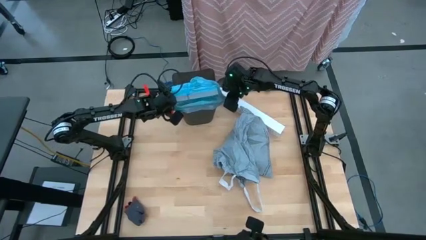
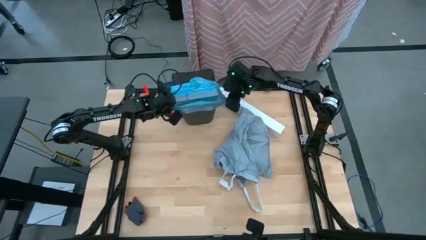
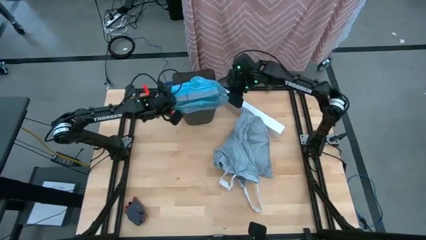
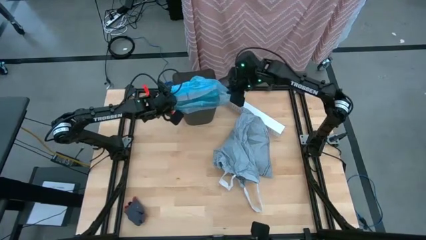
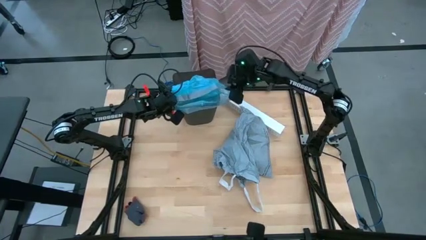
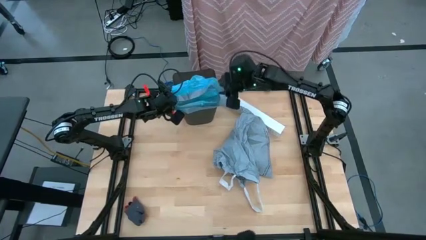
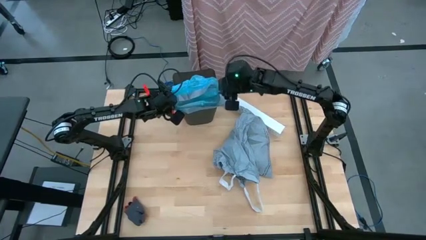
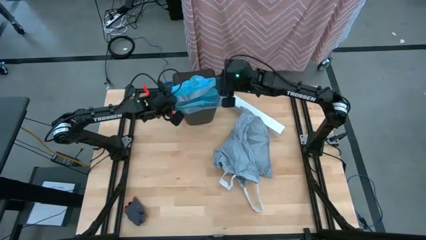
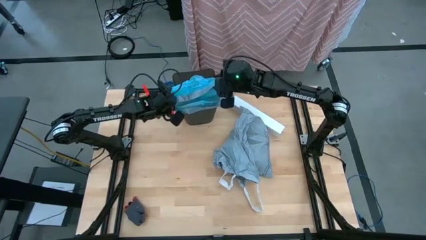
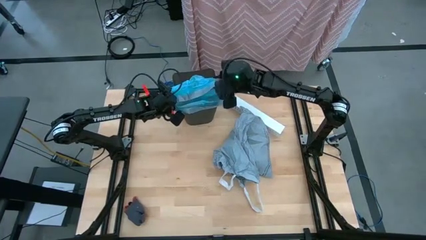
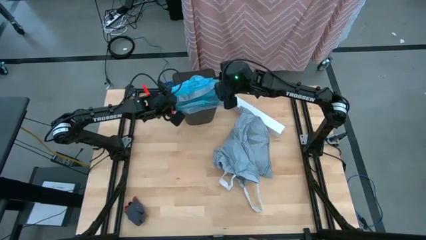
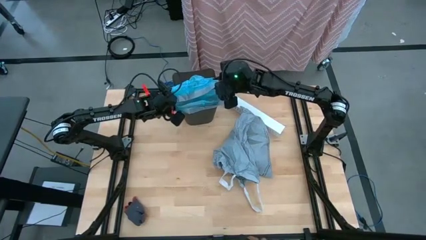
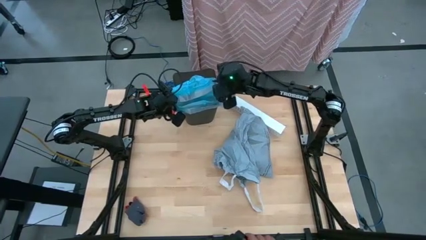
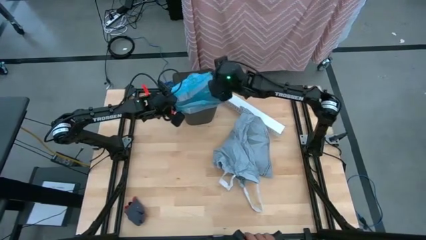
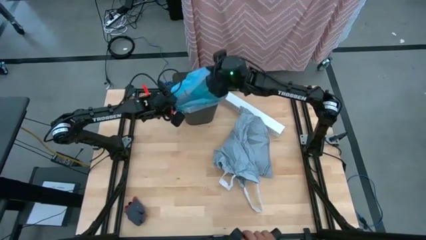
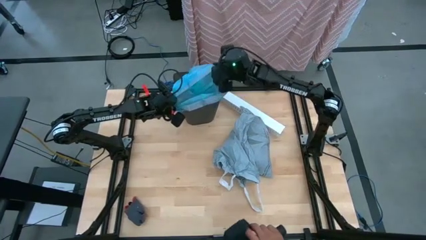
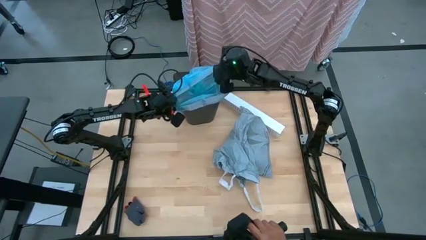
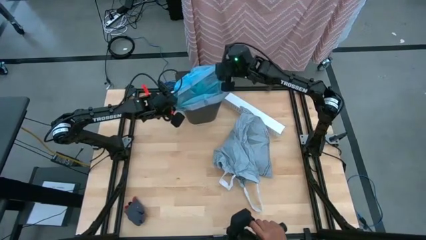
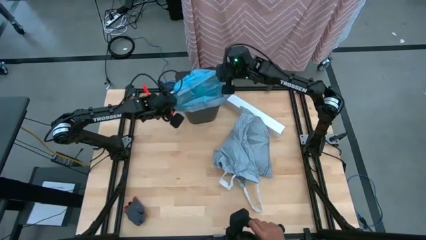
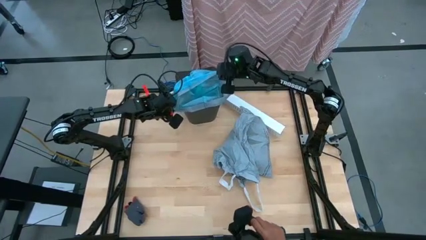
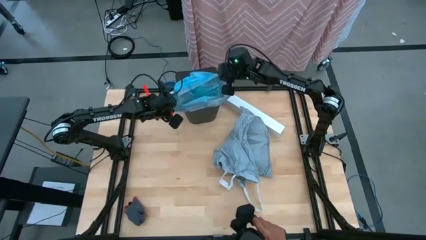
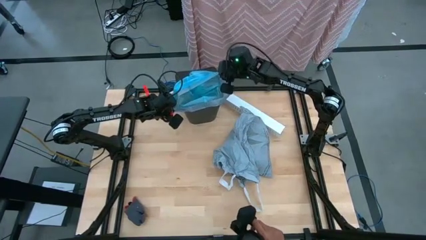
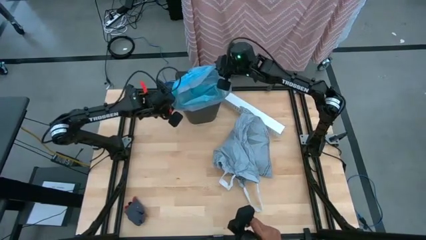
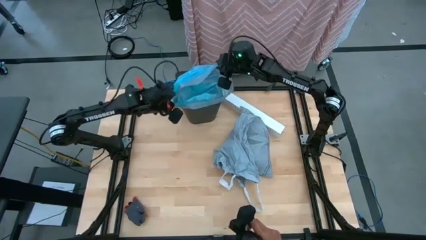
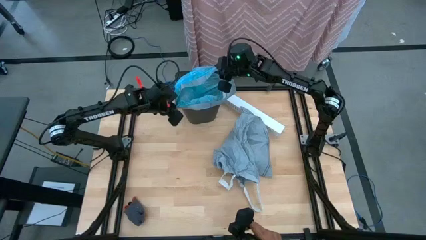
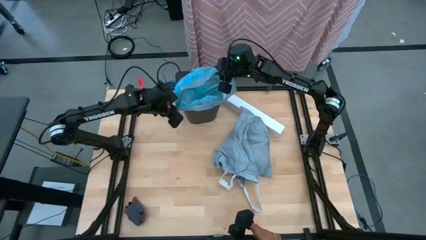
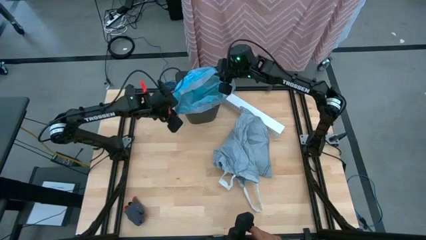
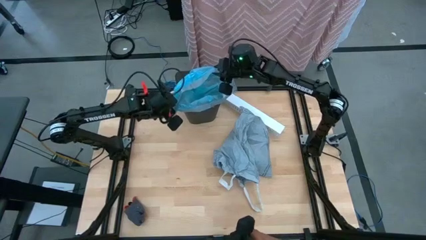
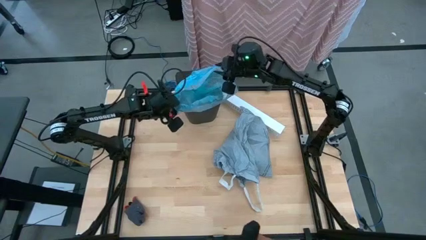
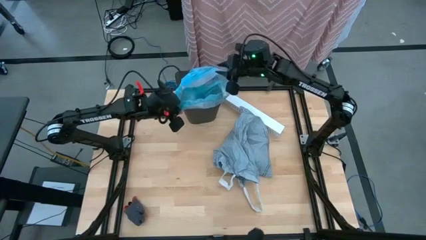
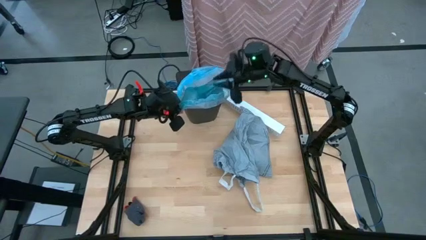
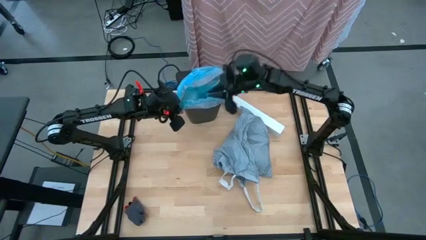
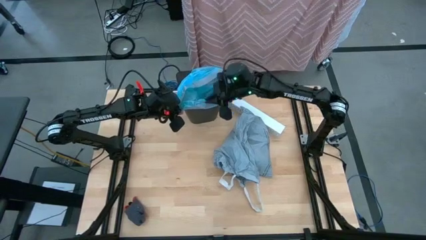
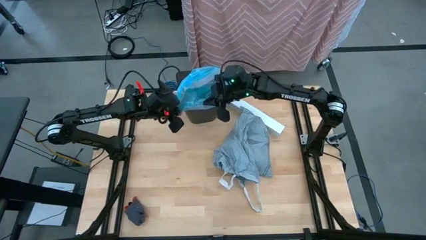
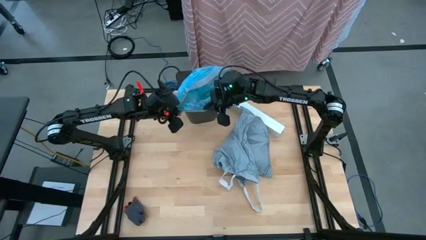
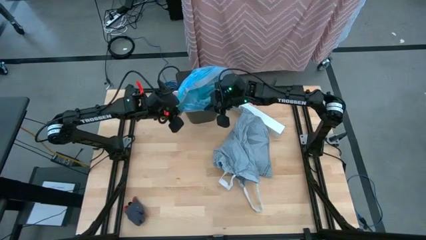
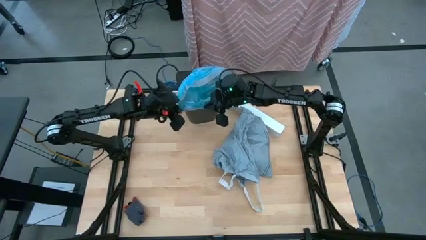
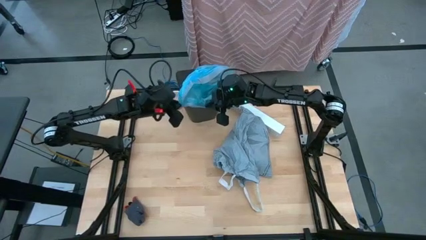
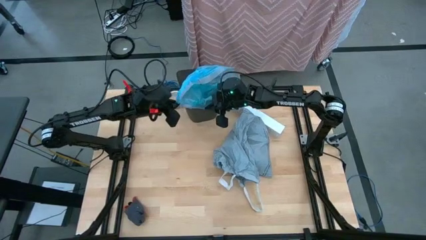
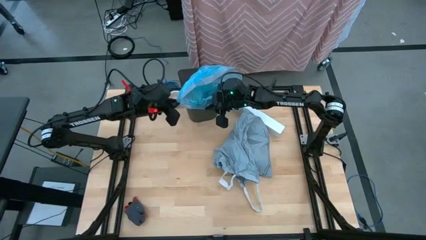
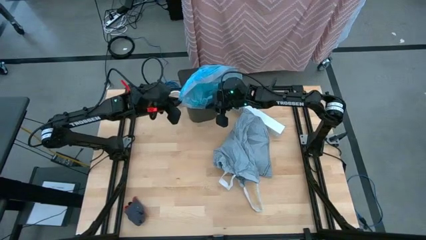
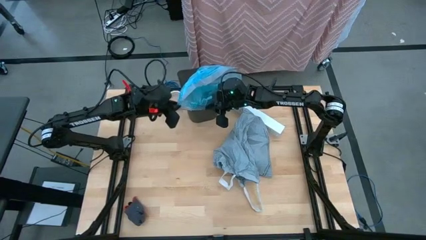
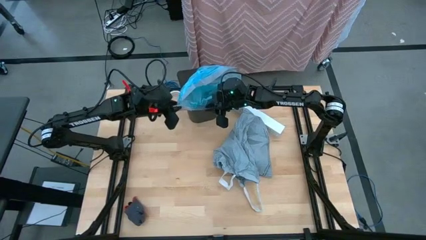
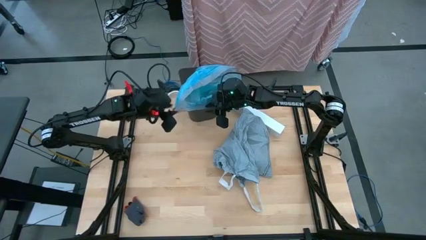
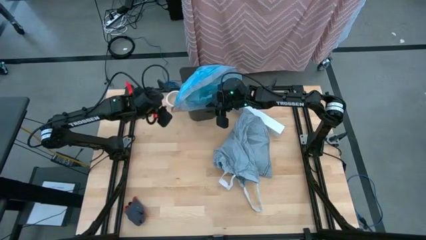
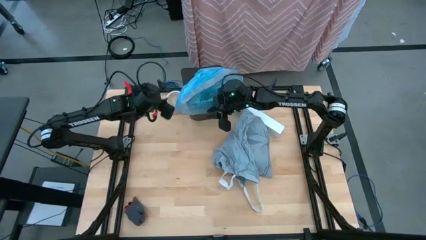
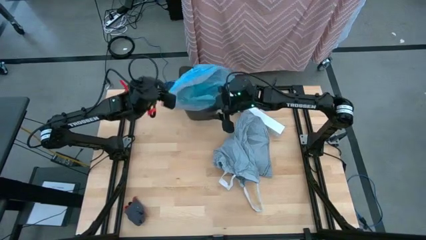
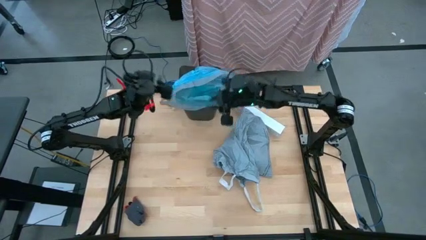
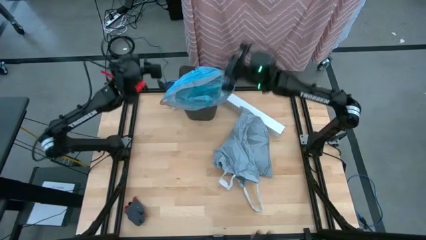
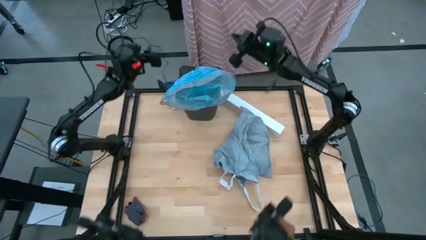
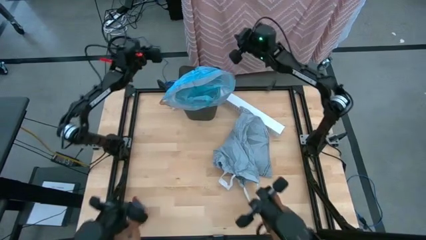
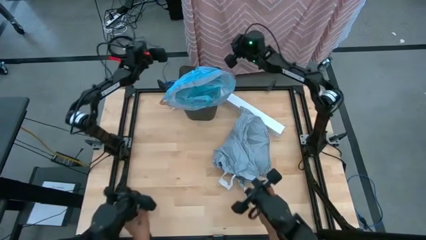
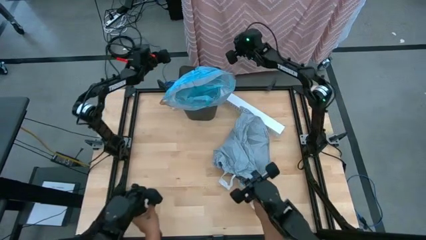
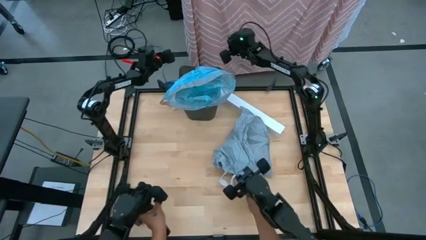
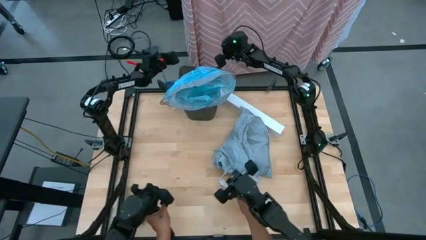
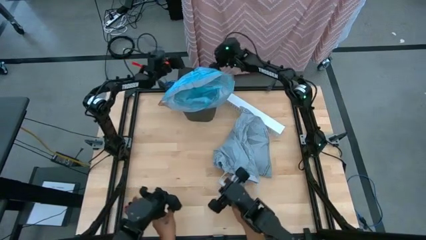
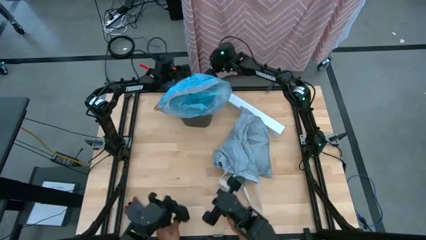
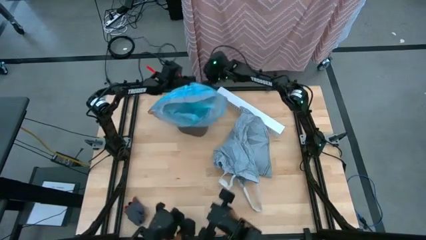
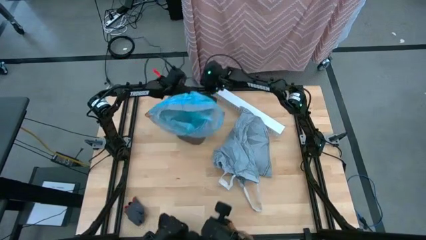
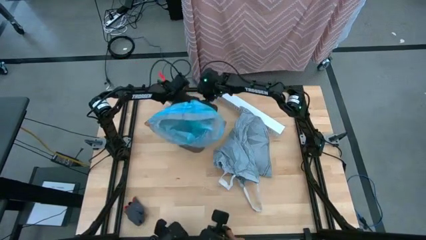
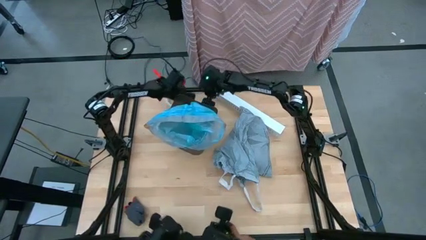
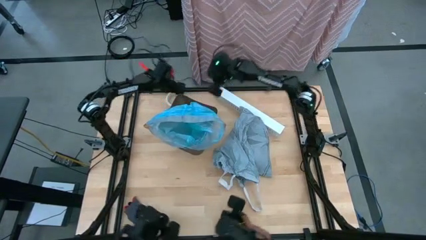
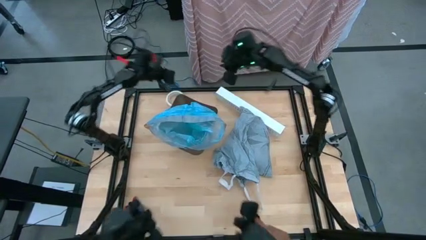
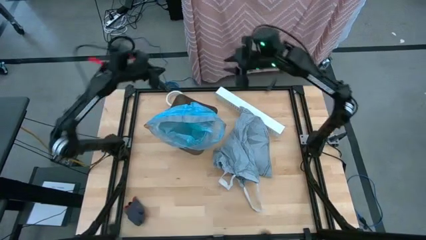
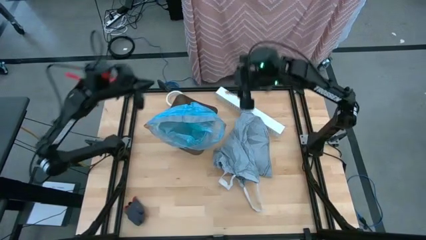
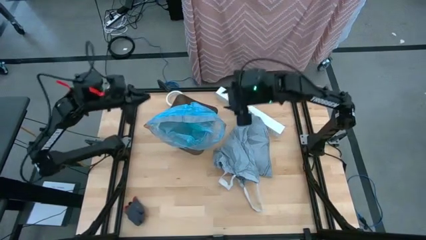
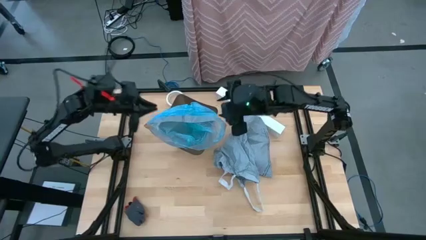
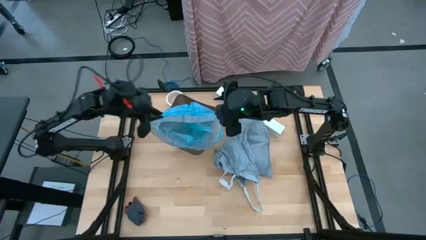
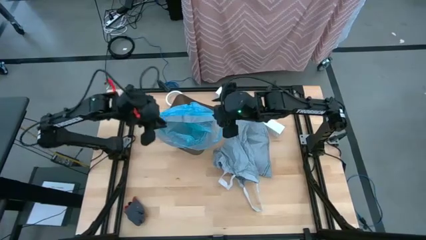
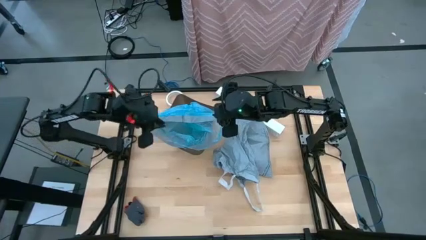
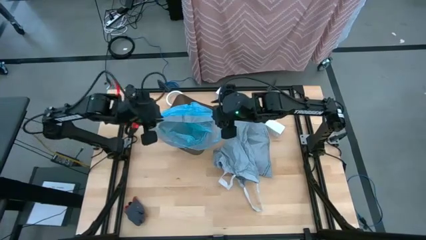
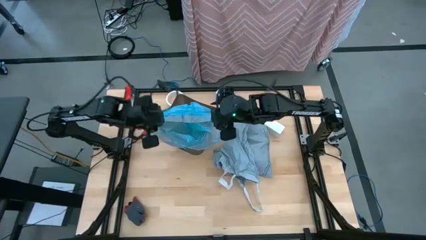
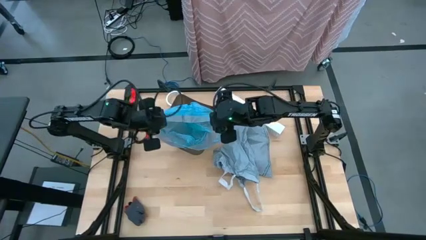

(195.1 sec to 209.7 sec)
Task: place trash/remove bag and relplace
Insert a new trash bag into the trash bin

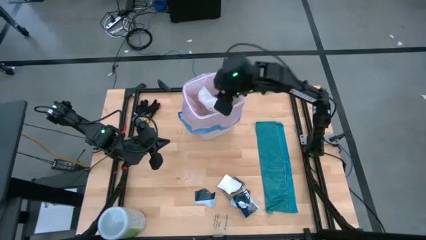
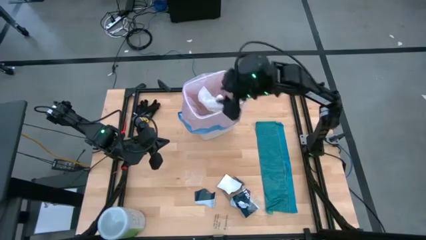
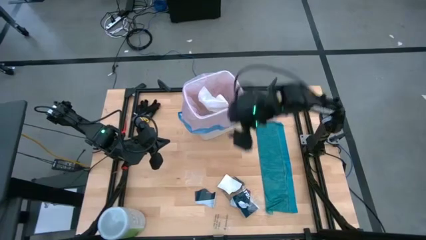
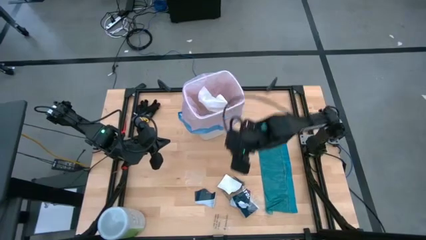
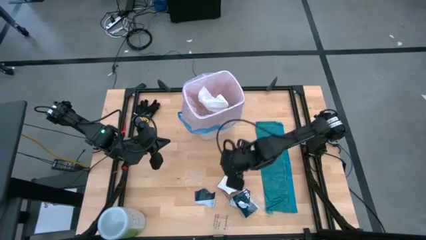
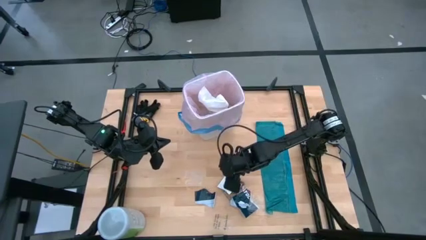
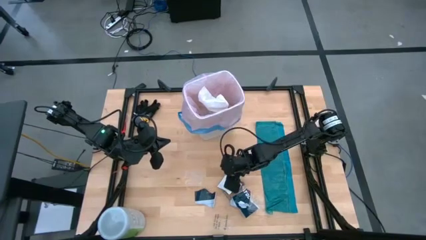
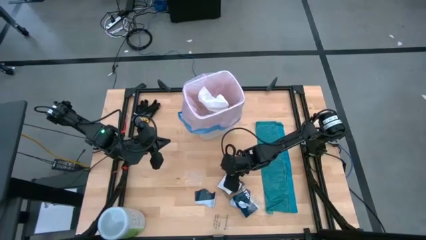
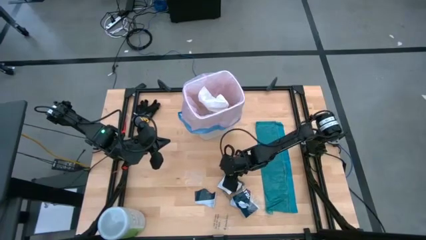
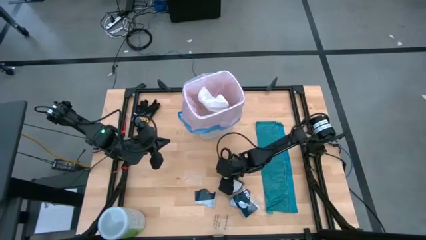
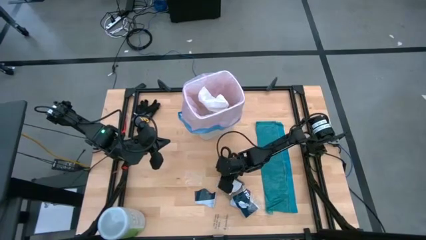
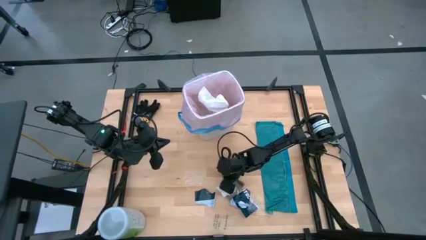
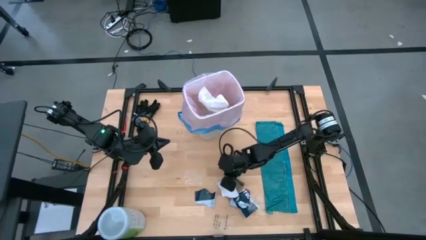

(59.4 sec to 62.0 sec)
Task: place trash/remove bag and relplace
Put the white paper into the white trash bin
